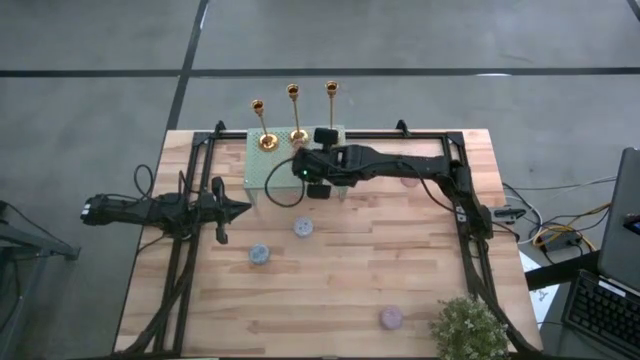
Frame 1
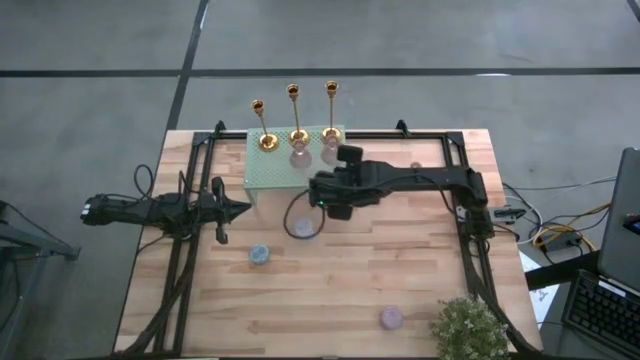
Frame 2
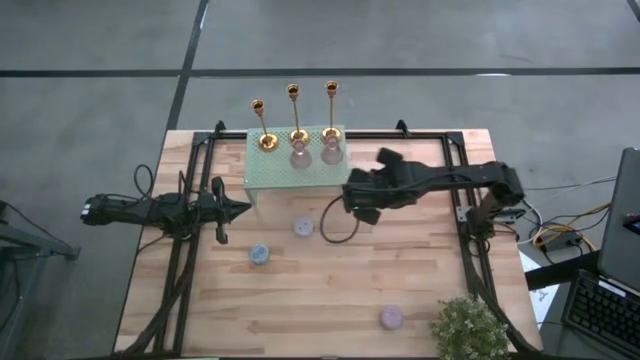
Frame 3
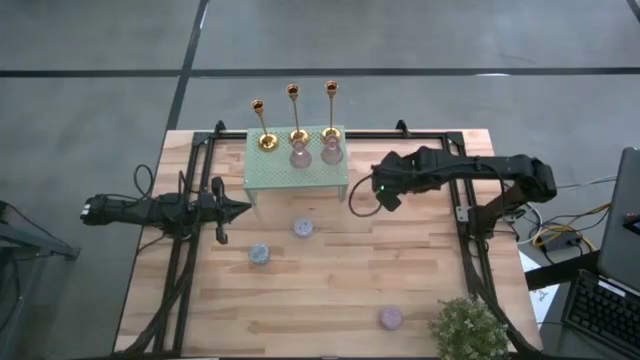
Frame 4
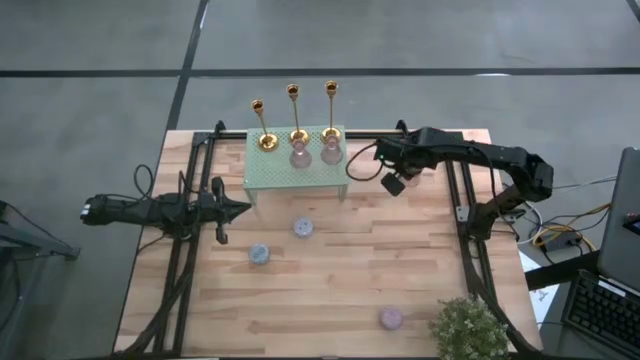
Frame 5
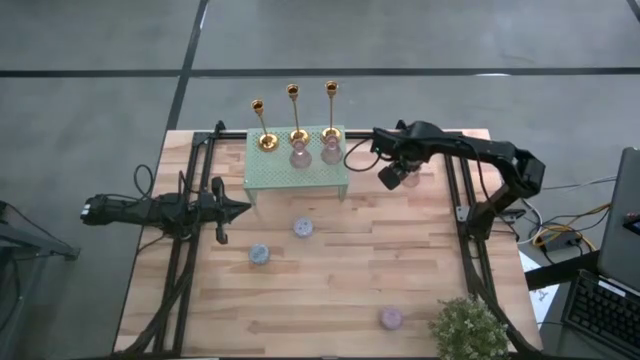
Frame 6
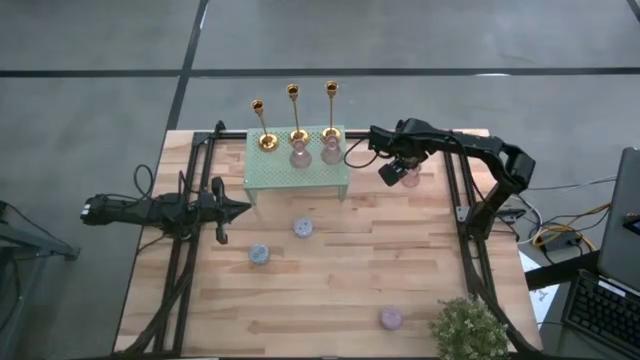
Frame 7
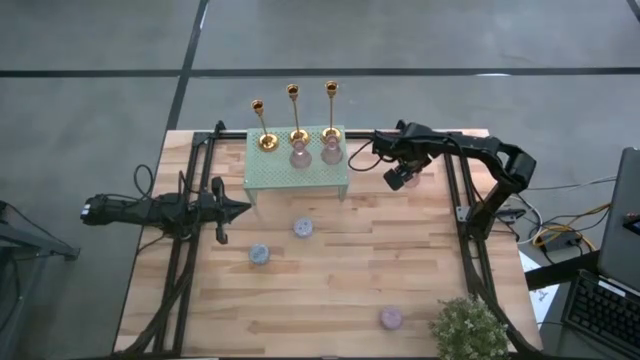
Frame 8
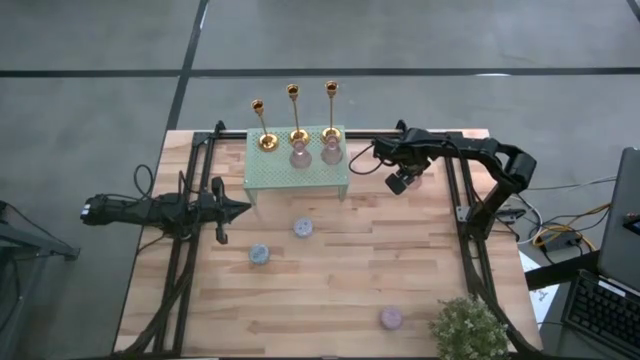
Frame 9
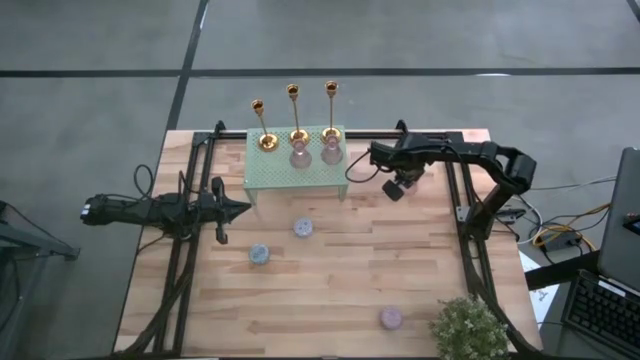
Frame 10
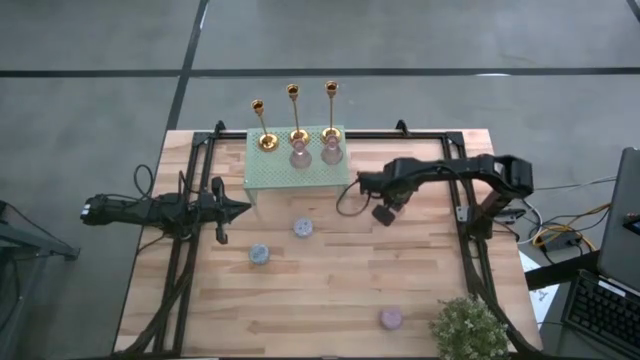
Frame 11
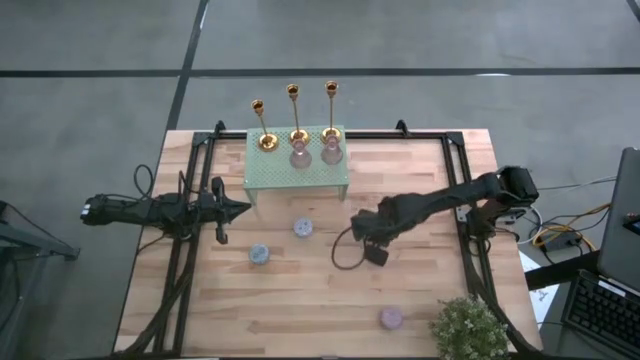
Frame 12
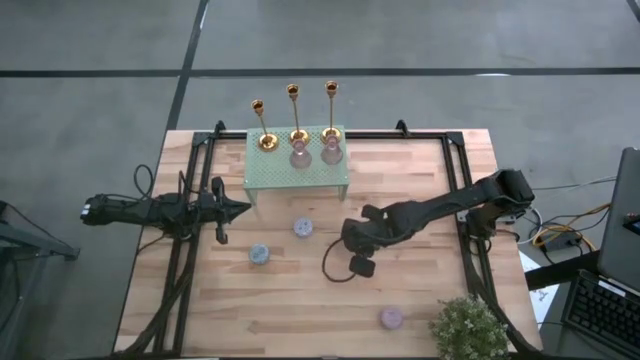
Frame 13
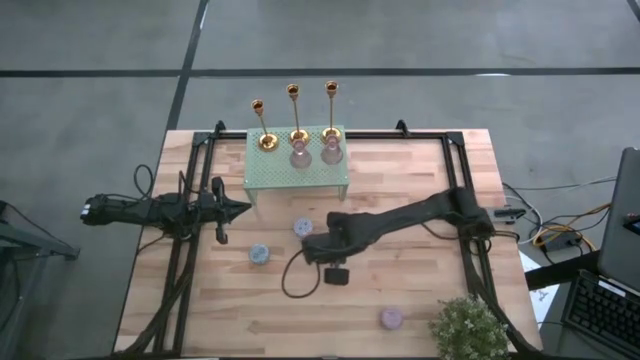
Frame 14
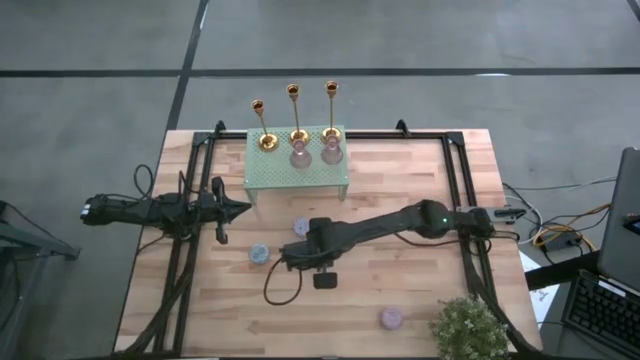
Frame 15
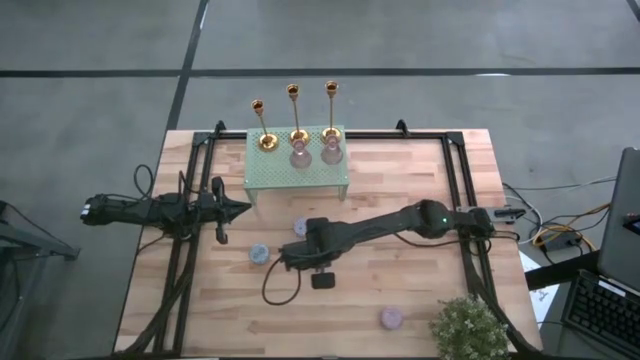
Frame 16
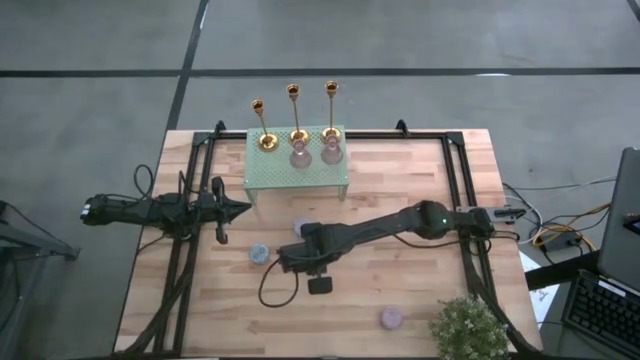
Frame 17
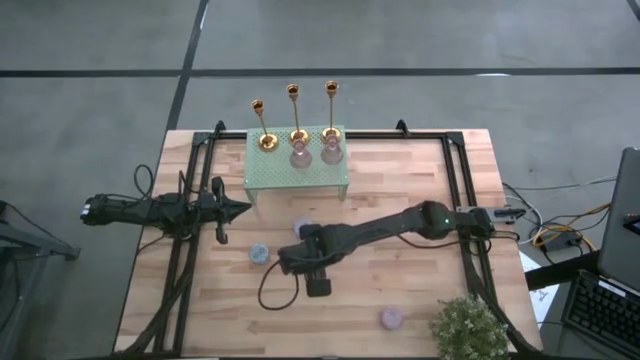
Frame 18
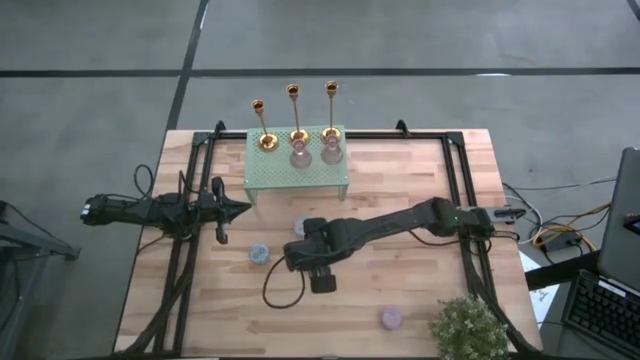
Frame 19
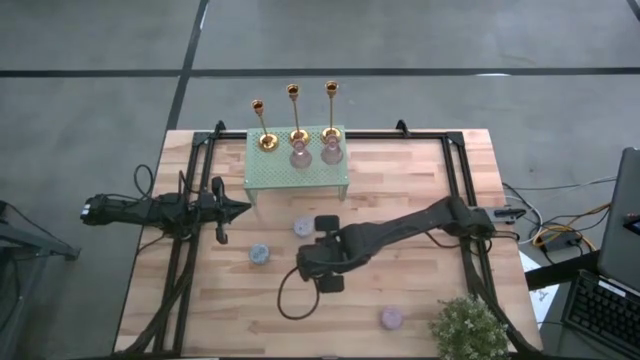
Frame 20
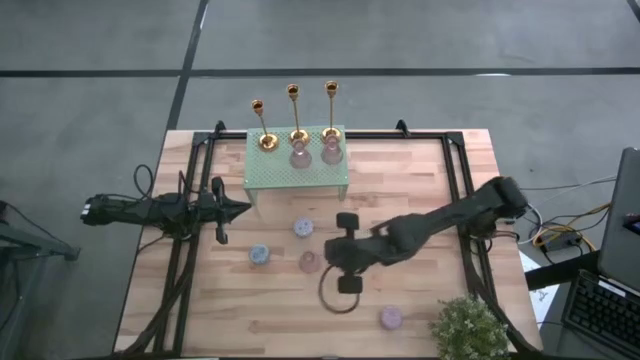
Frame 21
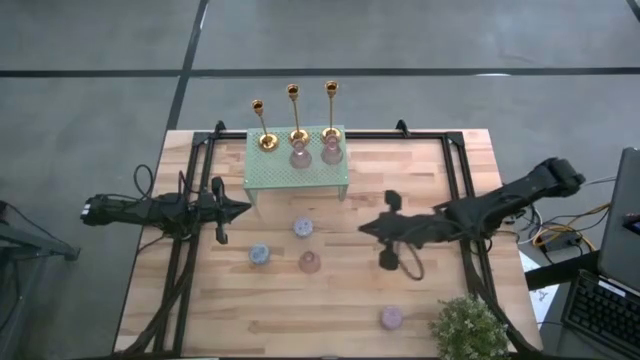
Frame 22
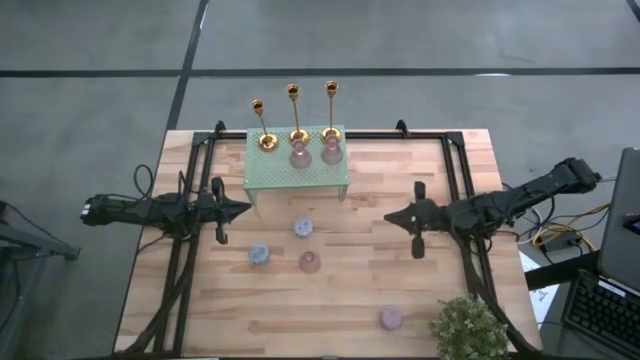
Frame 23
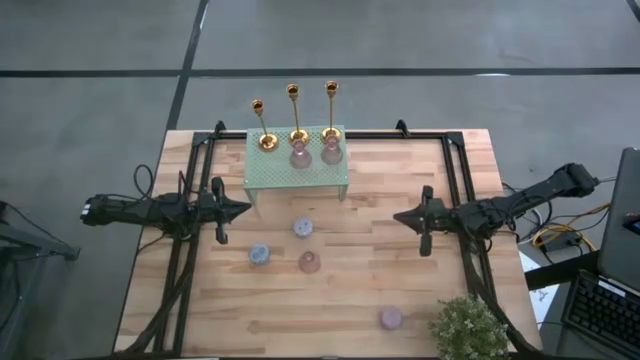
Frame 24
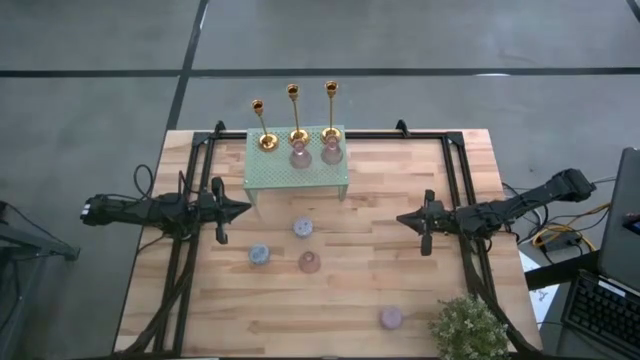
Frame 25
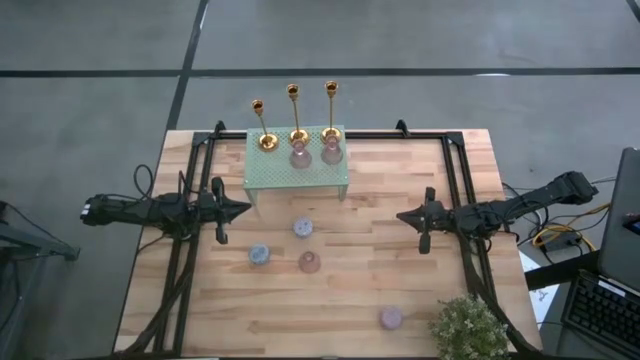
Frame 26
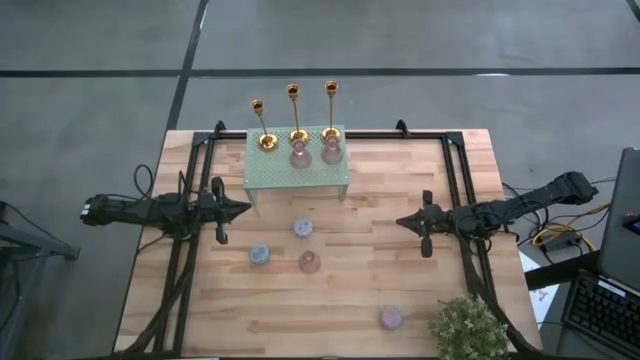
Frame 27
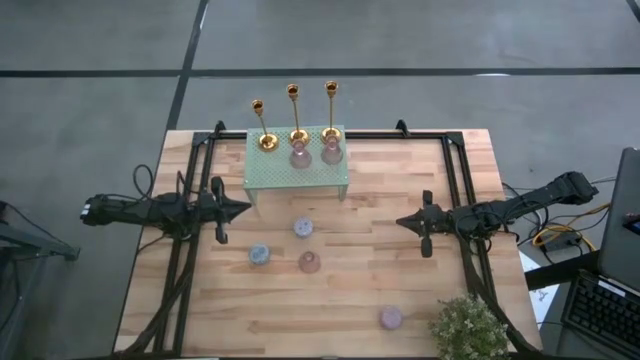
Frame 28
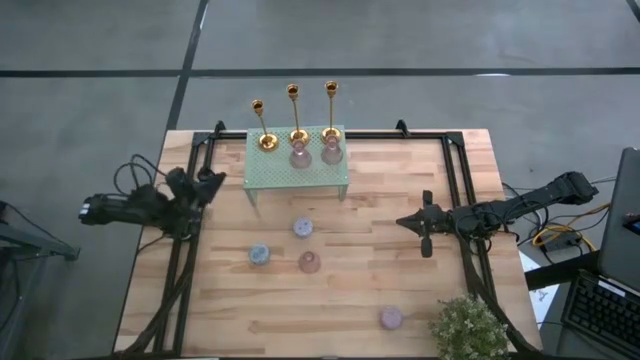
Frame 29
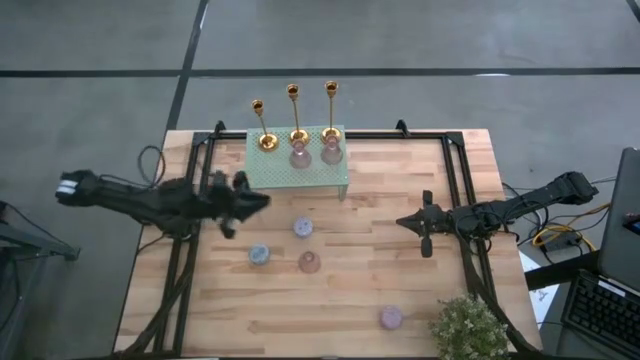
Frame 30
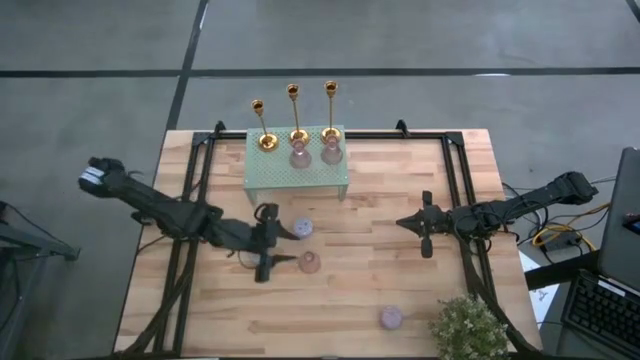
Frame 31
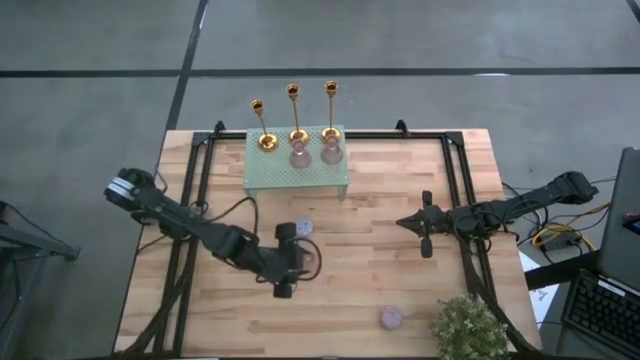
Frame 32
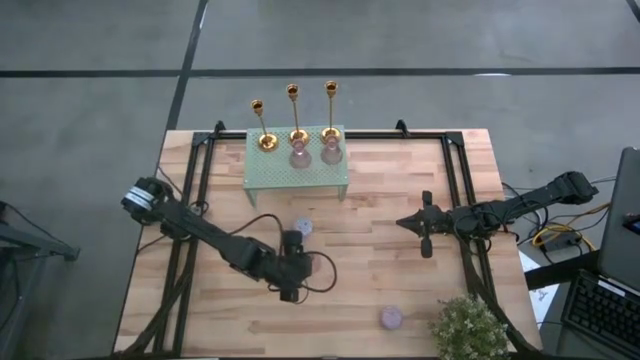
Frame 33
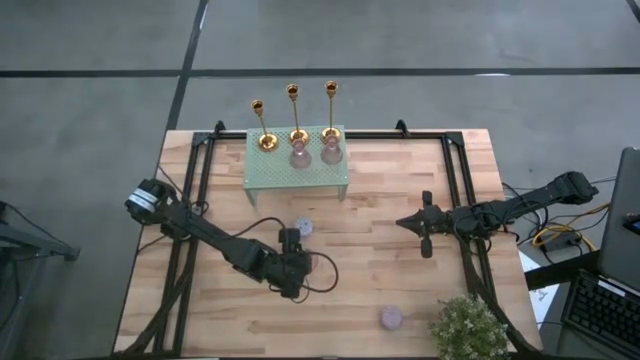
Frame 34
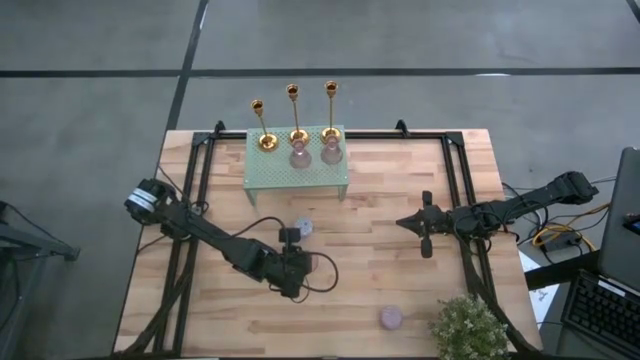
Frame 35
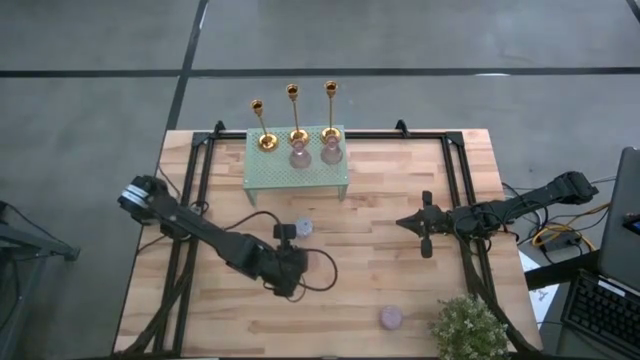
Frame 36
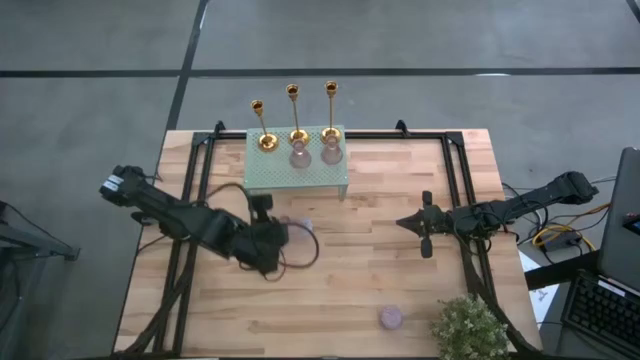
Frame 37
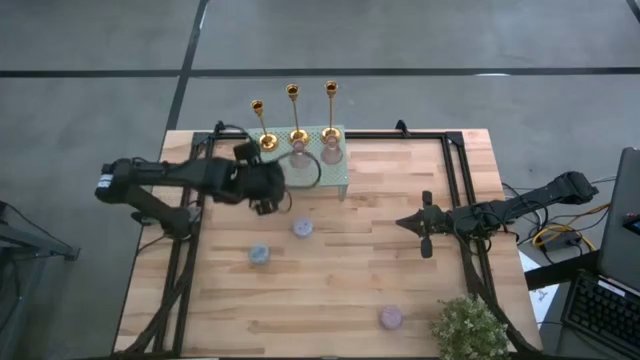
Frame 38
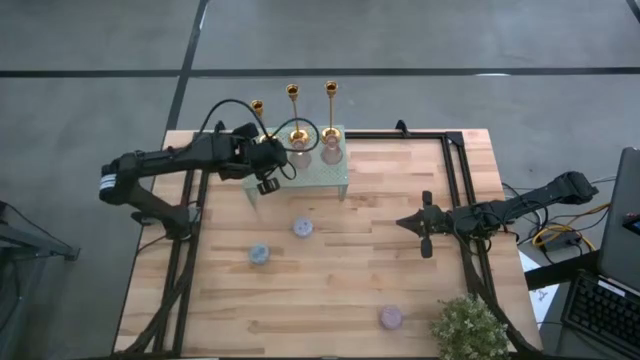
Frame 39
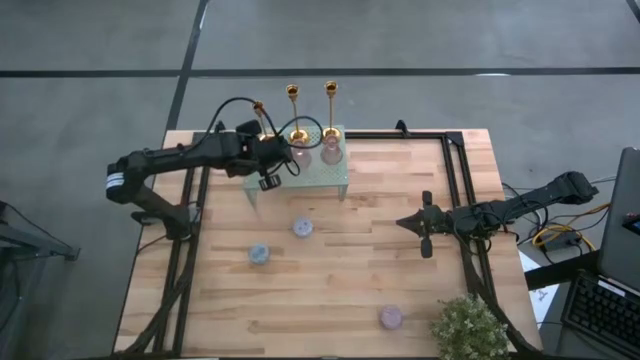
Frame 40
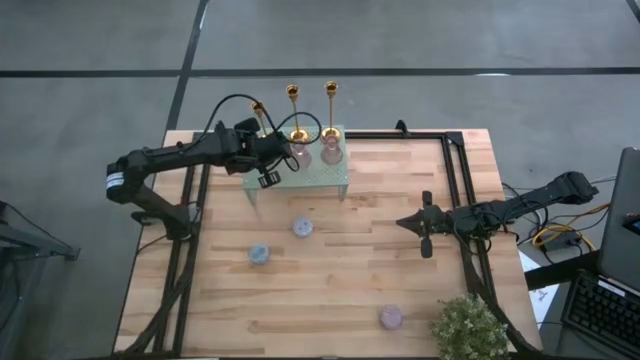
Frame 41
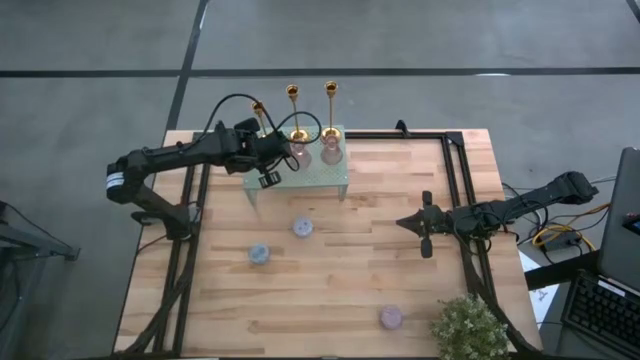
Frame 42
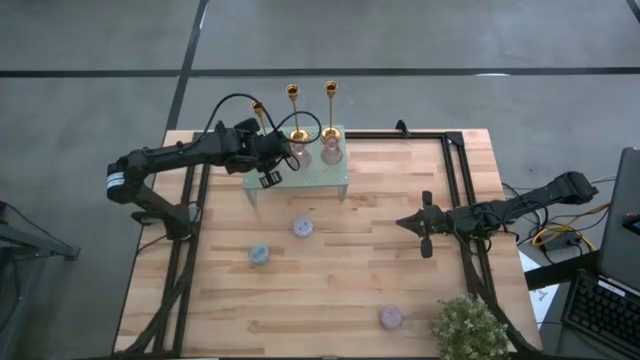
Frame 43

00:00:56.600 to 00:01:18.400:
Task: Pick & Place candle stick holders
Put the pink glass candle holder on the shelf
